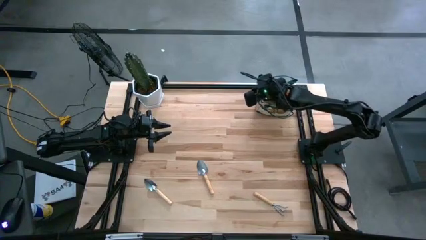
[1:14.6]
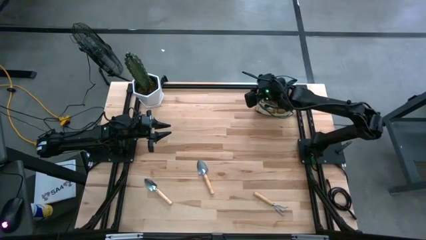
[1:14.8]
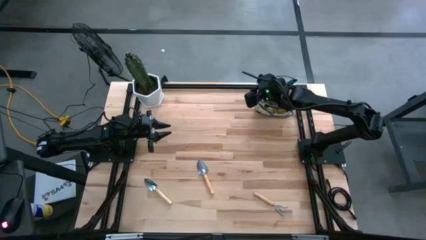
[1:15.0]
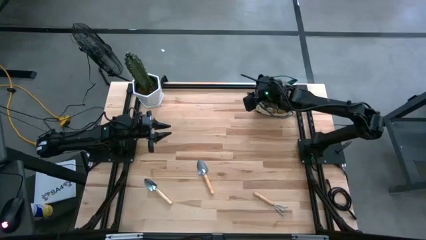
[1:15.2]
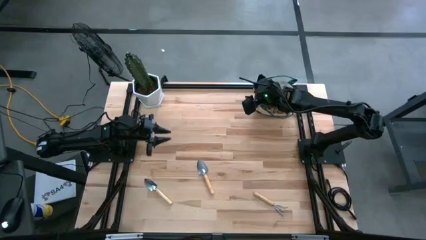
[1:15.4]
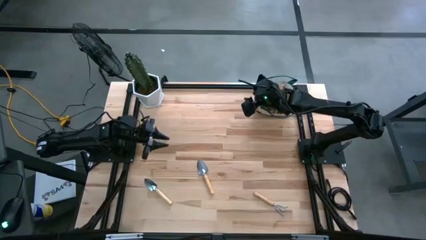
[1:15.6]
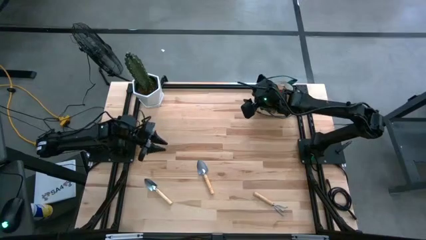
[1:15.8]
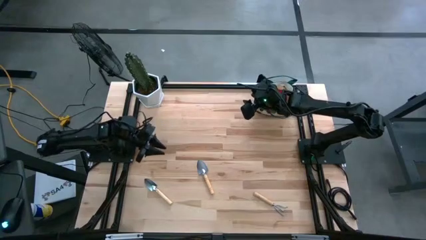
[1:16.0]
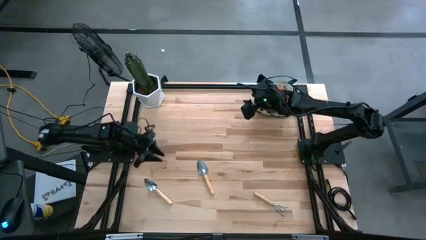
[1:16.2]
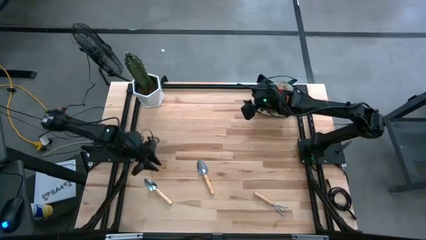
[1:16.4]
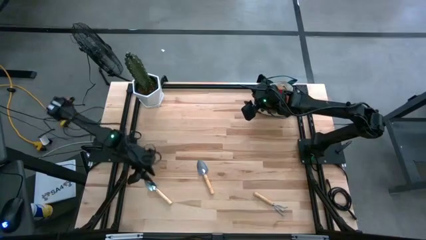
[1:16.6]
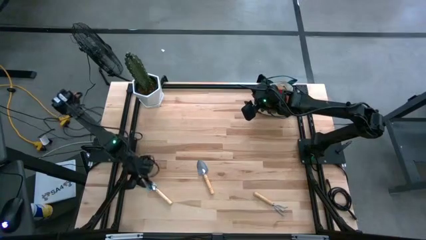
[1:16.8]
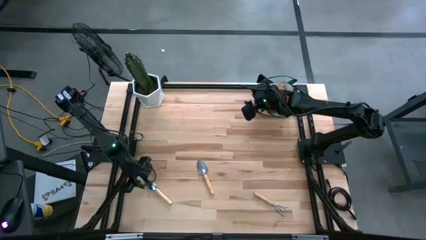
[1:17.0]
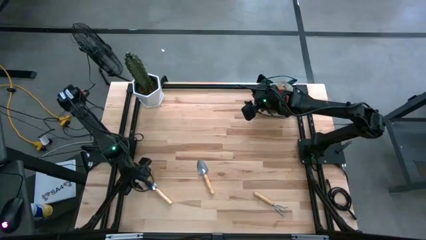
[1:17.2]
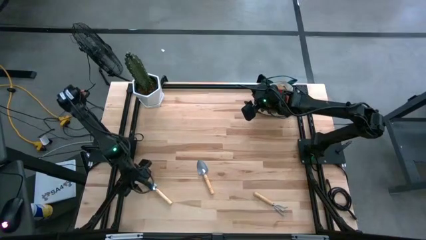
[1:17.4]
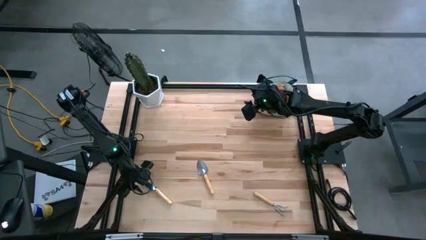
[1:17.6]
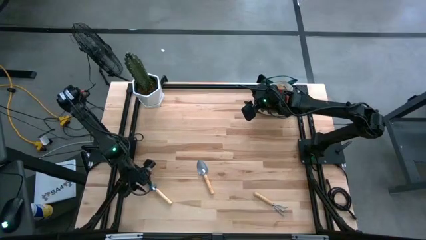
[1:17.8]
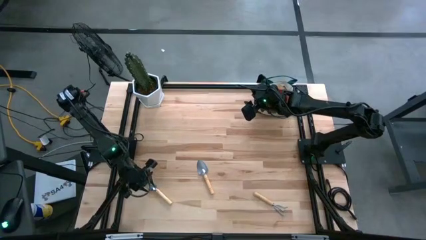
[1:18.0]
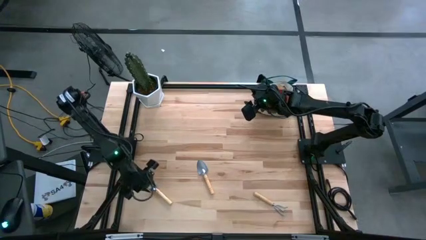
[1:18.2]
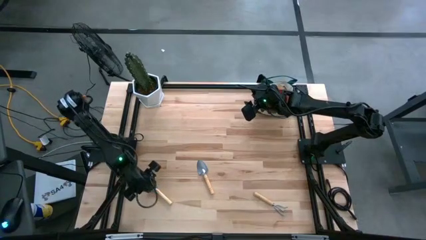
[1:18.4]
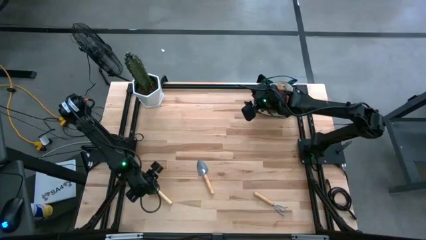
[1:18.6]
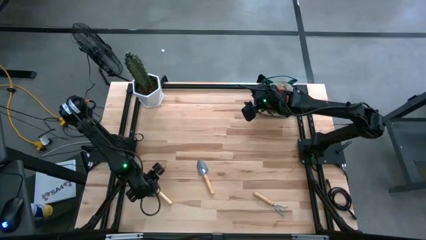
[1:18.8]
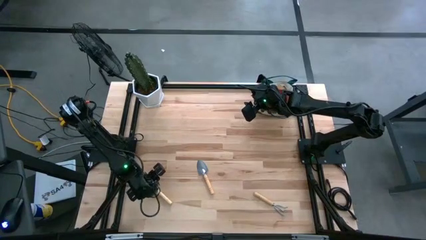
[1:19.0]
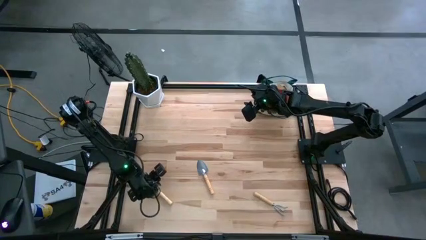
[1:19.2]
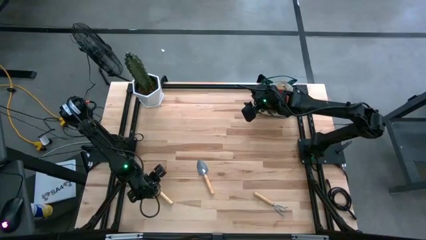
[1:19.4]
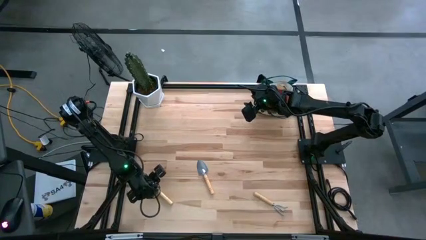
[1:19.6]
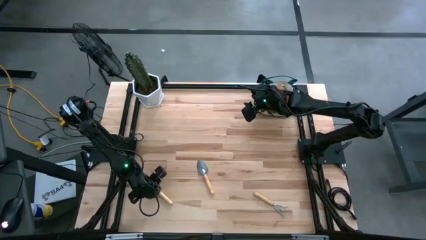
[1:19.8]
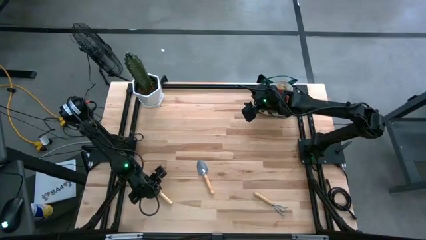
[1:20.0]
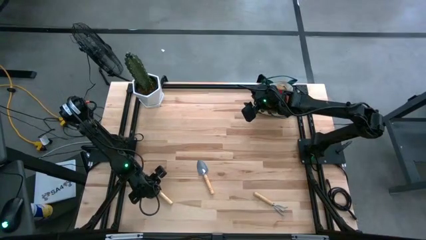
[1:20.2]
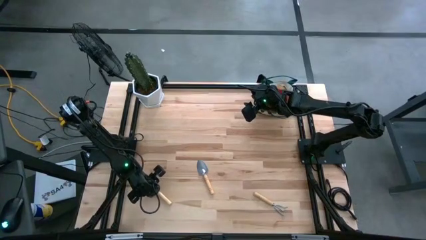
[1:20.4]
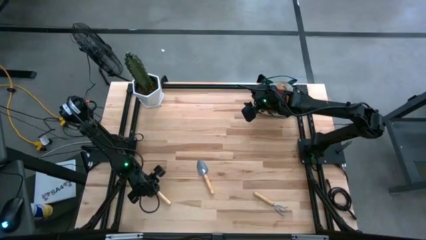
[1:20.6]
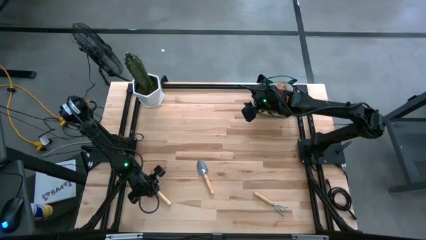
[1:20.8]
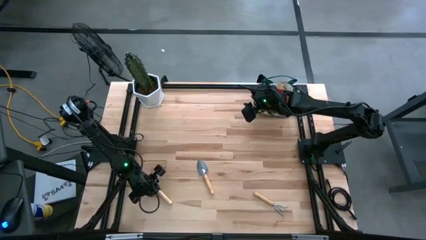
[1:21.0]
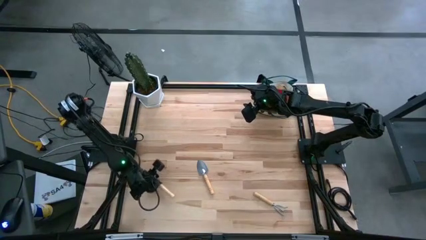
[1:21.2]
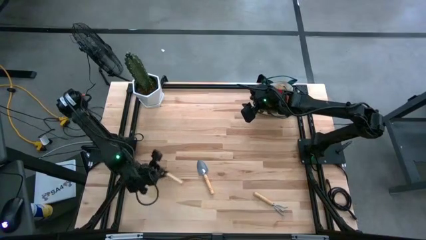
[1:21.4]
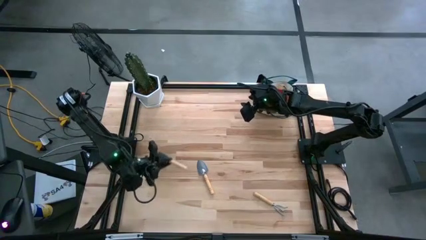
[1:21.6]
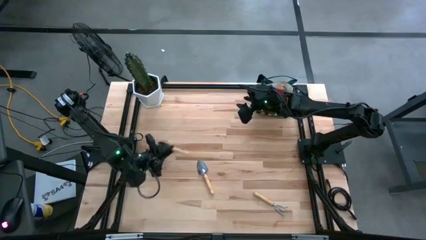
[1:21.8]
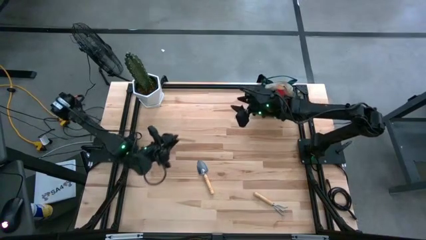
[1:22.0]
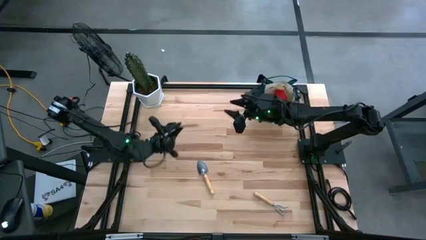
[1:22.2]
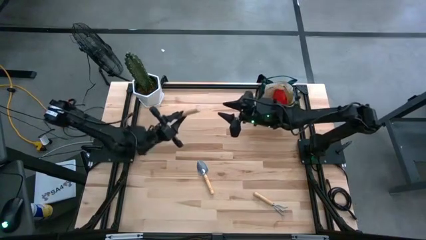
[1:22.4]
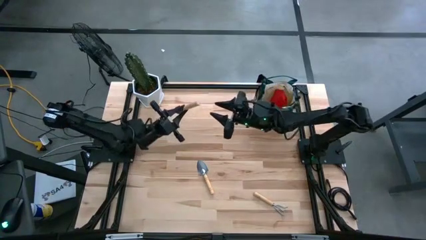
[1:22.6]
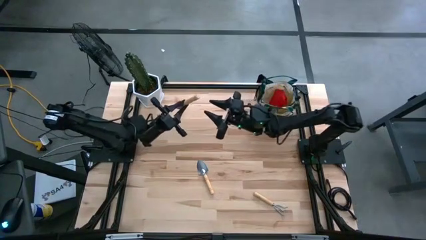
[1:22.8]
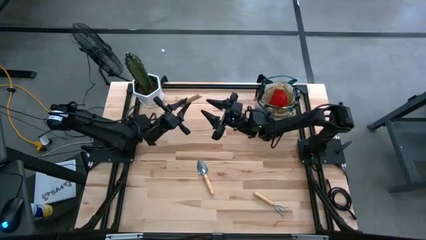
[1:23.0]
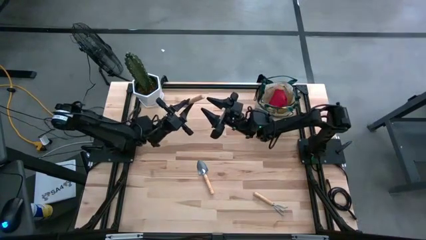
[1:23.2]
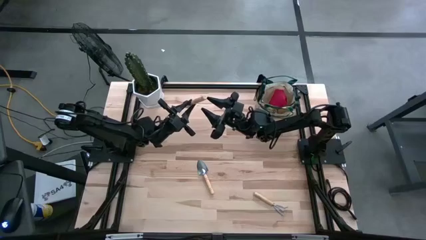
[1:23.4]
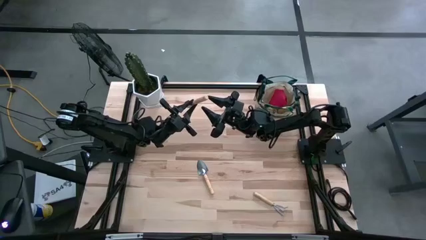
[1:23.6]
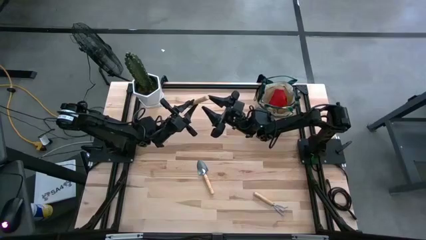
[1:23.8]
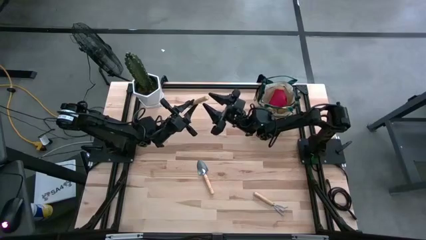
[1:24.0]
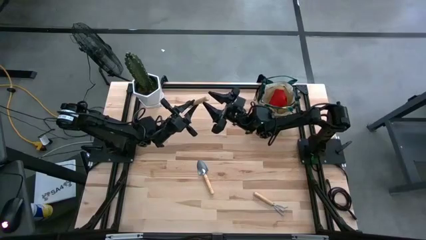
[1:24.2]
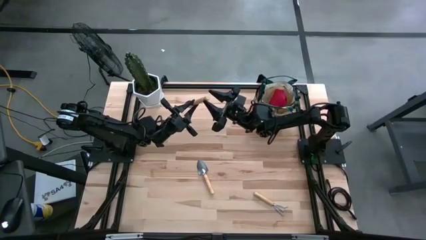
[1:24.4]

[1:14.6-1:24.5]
Task: Pick & Place Garden tools in Gardening bag
Put the left brown trowel into the gardening bag

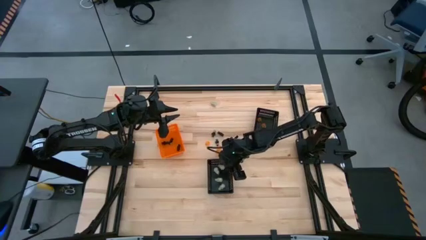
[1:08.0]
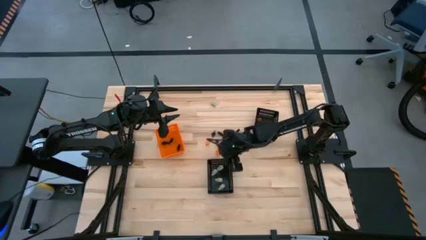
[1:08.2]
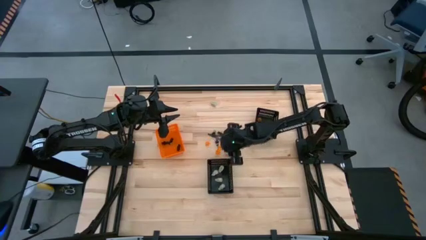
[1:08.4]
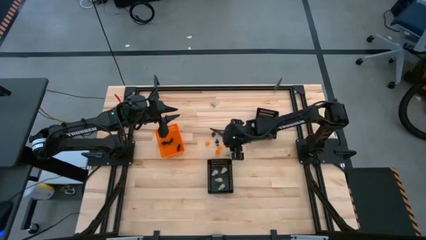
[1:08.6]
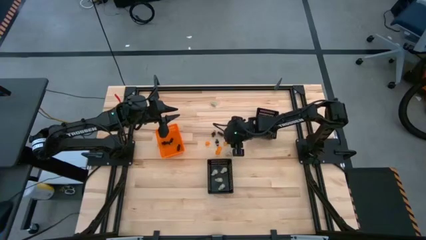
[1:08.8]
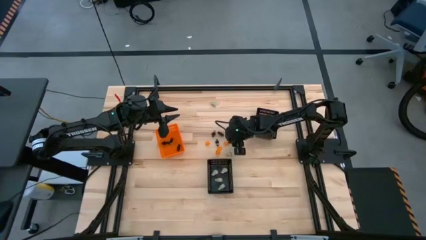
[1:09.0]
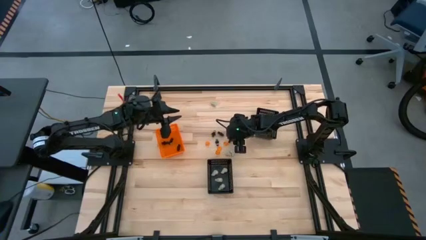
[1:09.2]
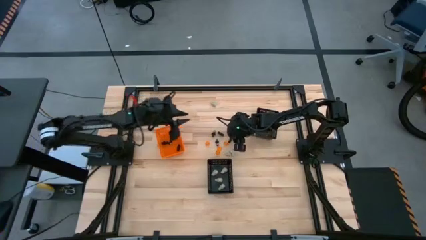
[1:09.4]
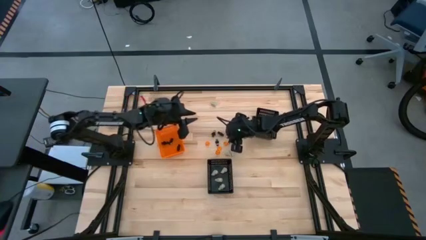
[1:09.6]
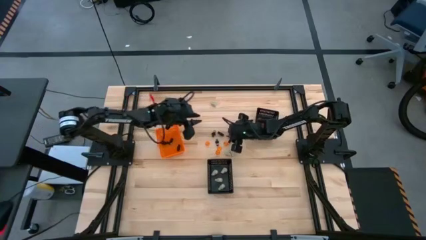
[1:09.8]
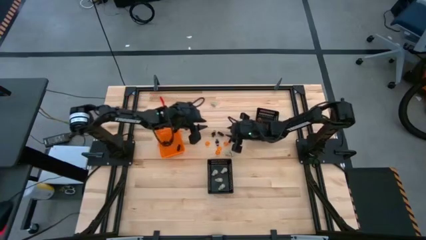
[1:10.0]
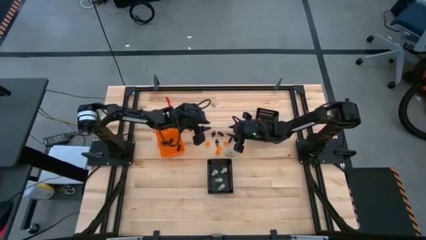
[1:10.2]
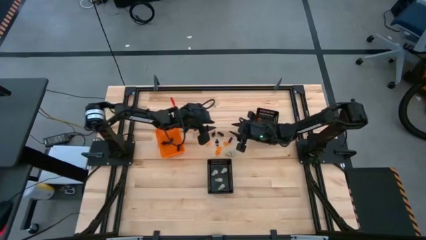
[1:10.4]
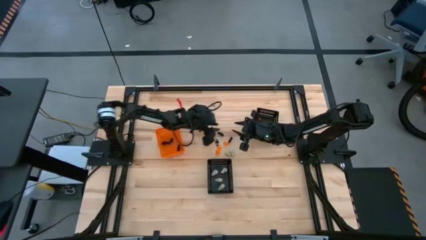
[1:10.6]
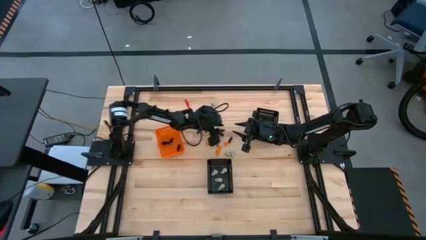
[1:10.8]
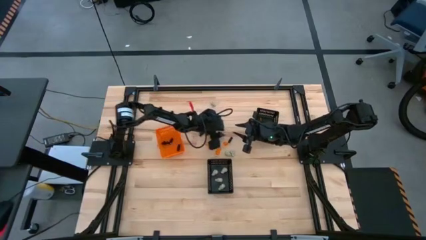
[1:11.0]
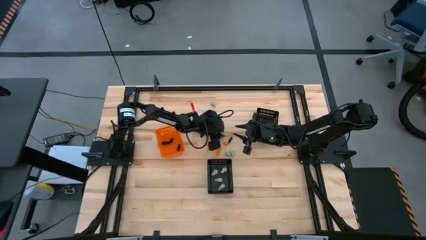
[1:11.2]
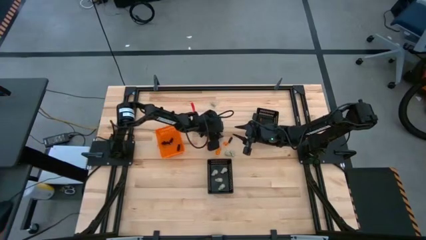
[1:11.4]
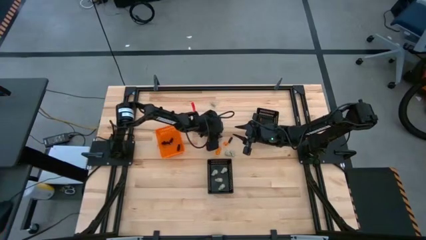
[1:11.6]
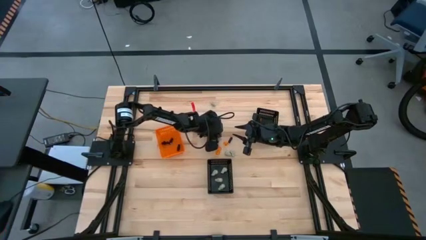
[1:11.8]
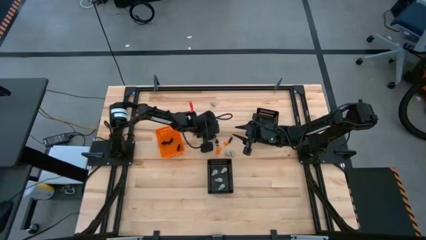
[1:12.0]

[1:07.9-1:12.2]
Task: Sort Halloween decoration
Put the black skeleton toy into the orange bin

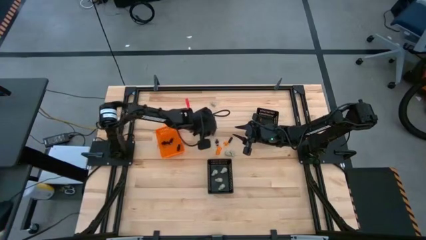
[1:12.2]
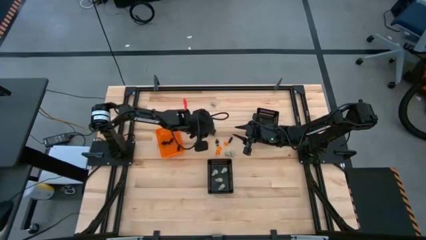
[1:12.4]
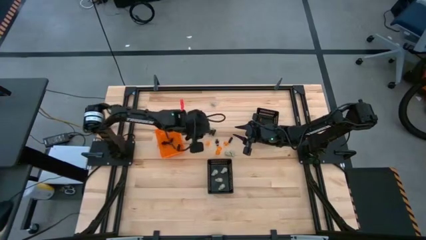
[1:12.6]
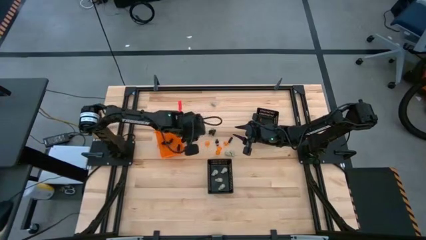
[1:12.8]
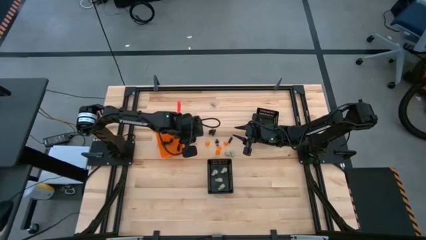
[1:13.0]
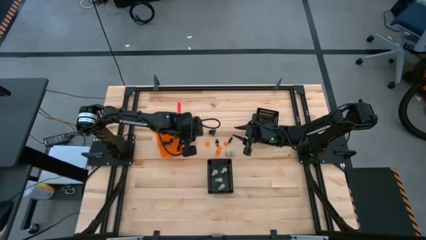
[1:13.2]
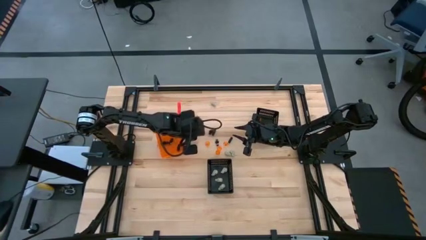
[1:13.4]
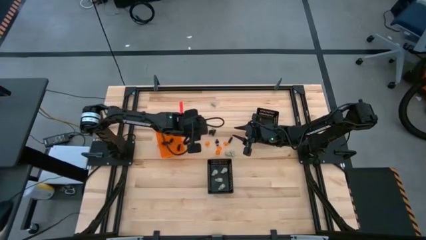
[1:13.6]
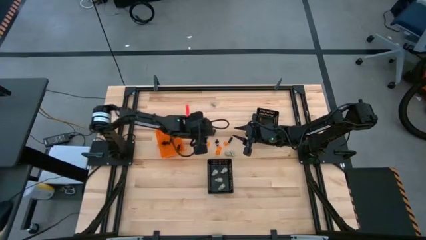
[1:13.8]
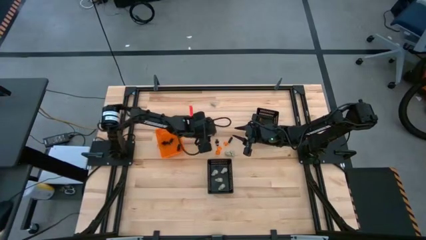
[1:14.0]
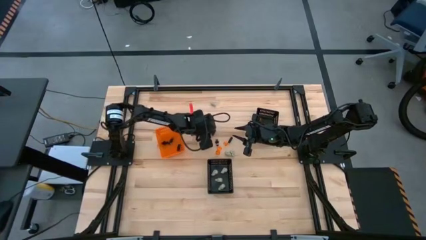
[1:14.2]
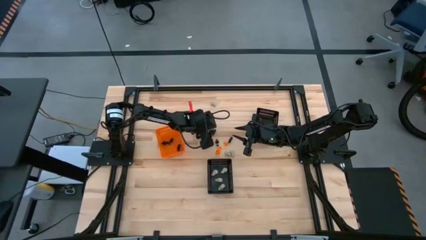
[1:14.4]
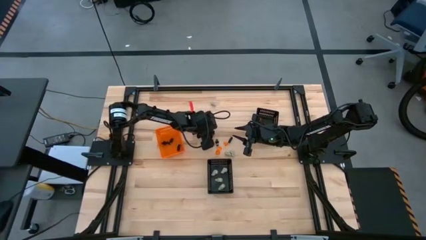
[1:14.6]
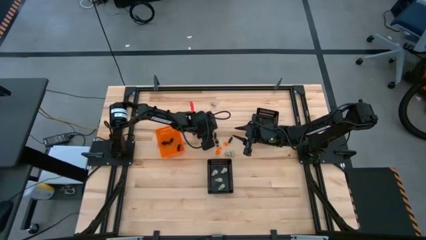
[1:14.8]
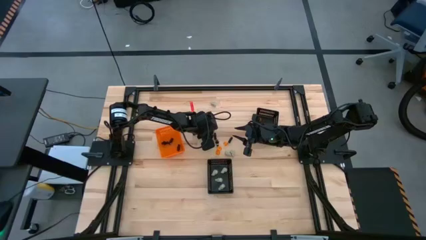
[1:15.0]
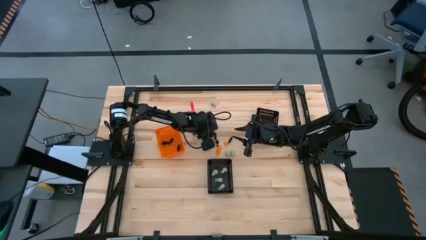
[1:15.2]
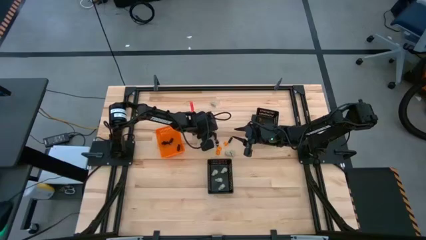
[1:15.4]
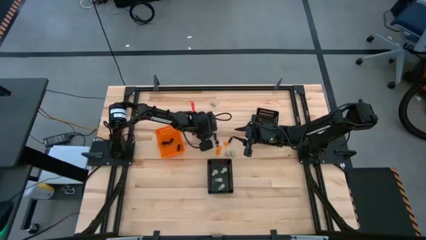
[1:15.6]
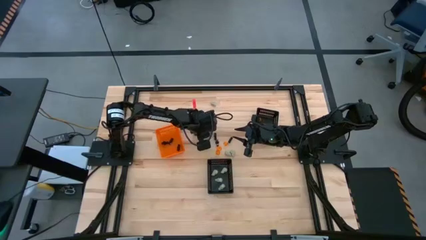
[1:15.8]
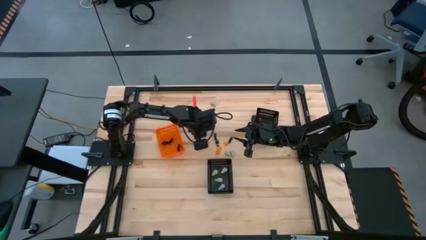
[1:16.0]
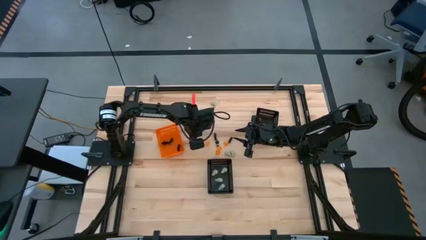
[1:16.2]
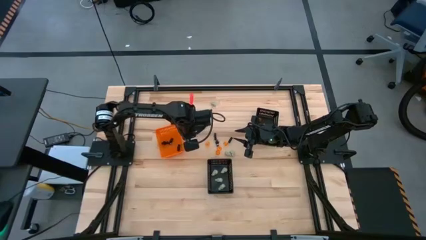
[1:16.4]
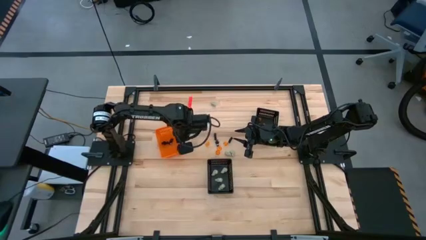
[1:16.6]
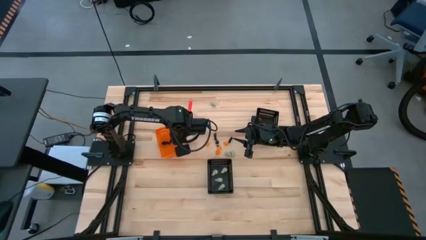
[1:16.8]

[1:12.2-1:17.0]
Put the black skeleton toy into the orange bin
